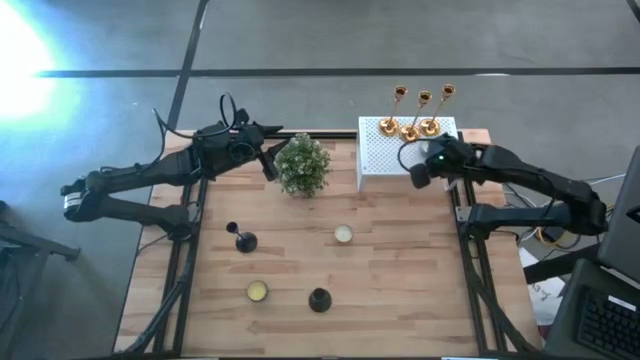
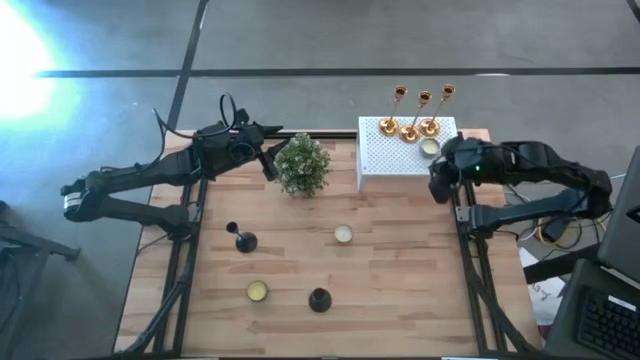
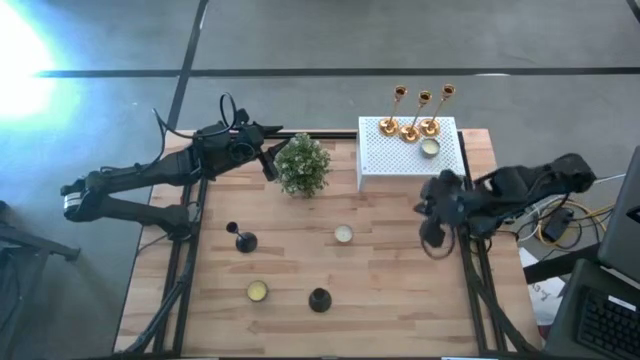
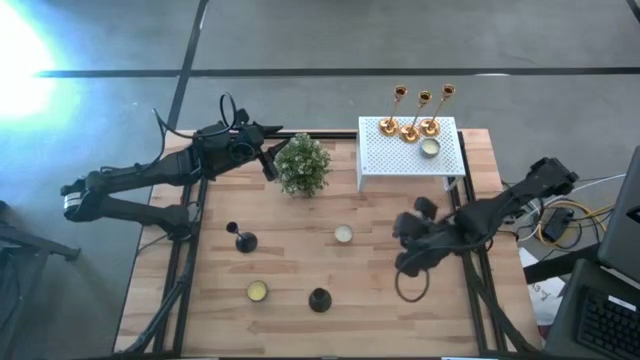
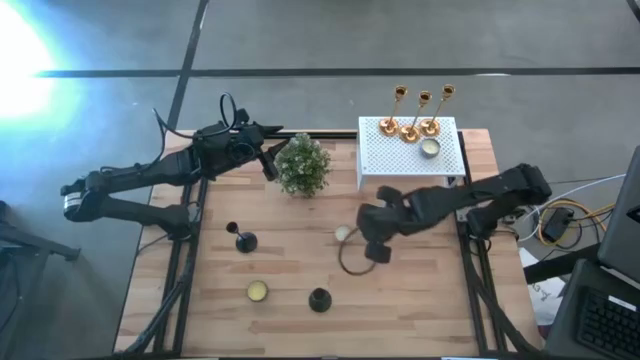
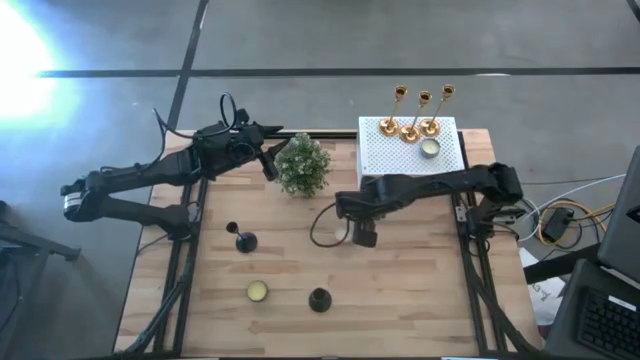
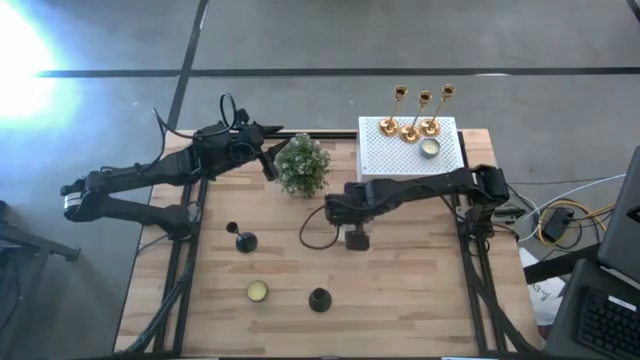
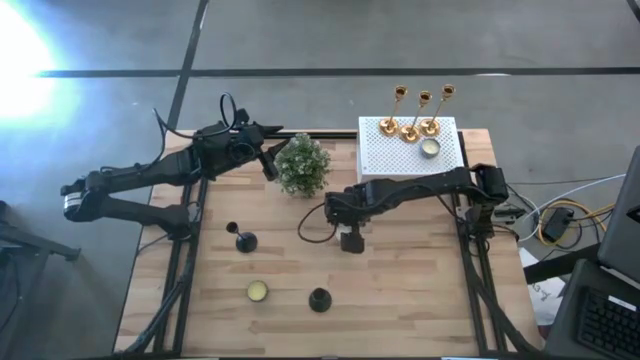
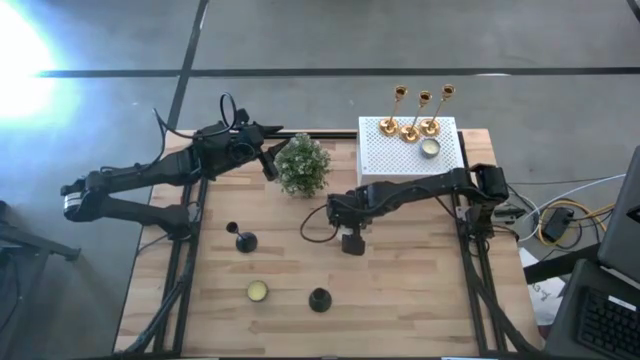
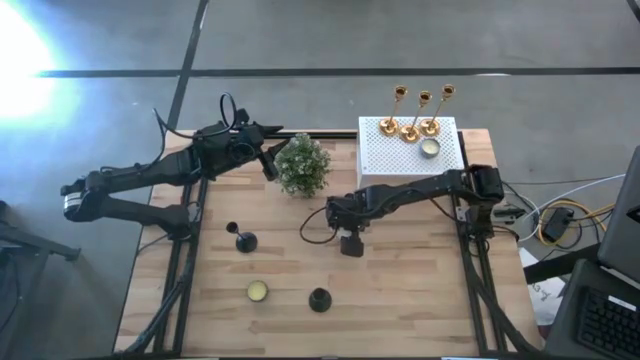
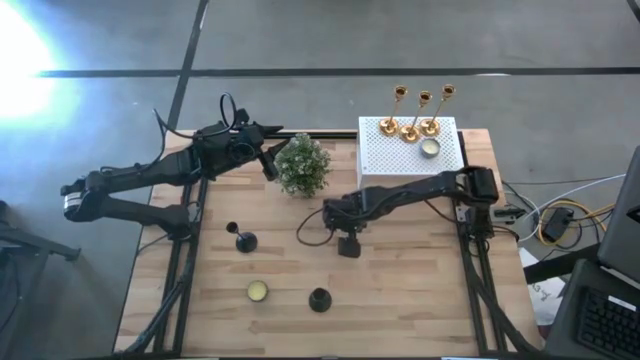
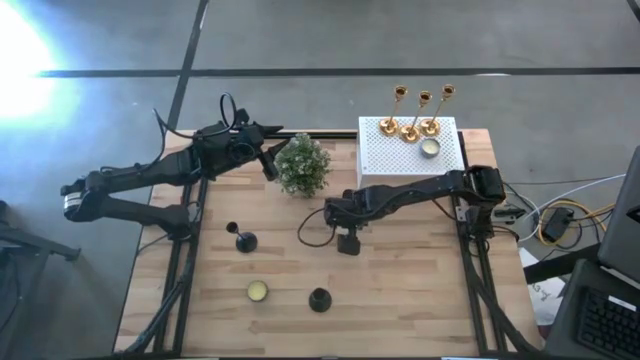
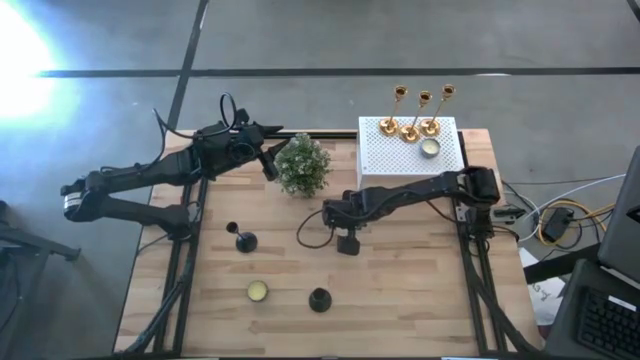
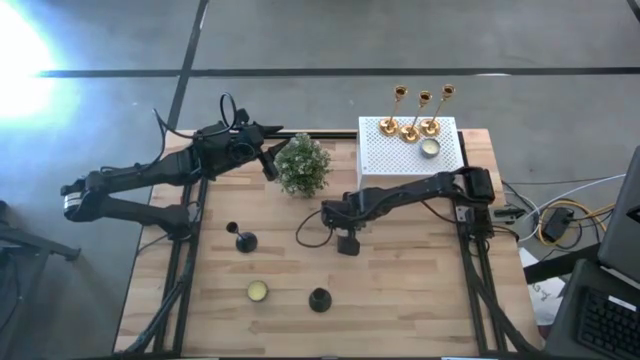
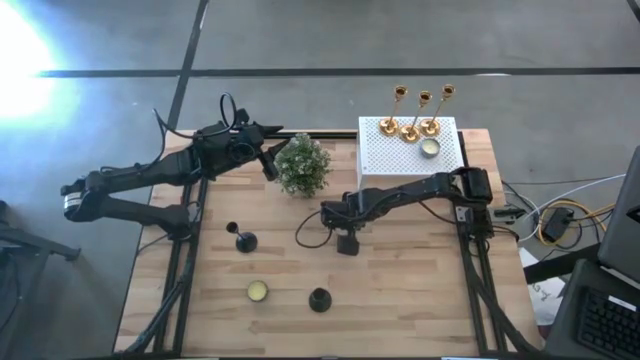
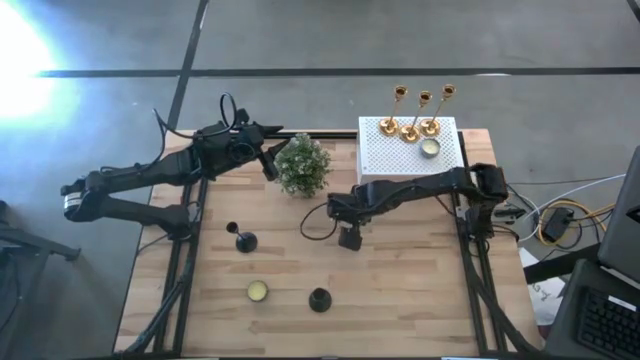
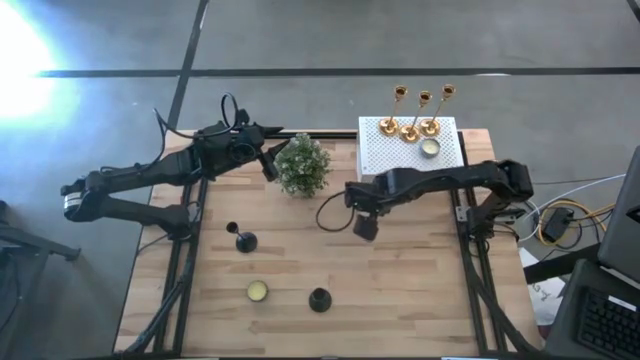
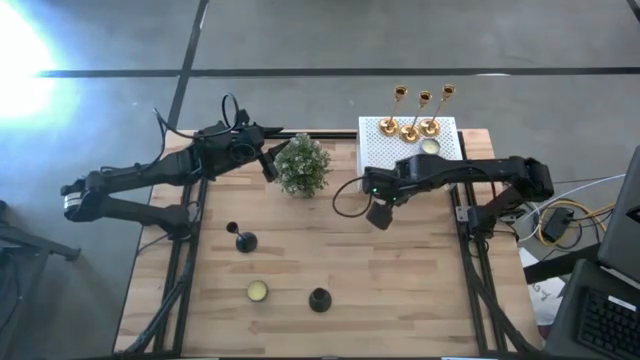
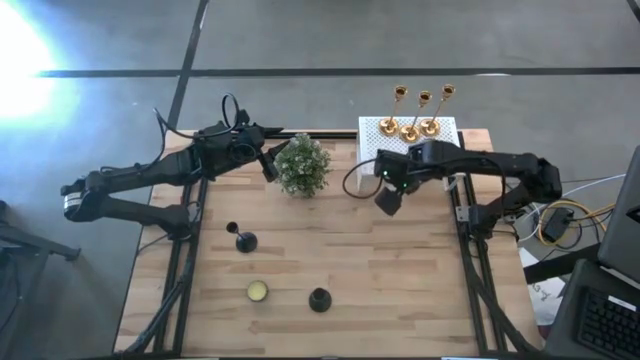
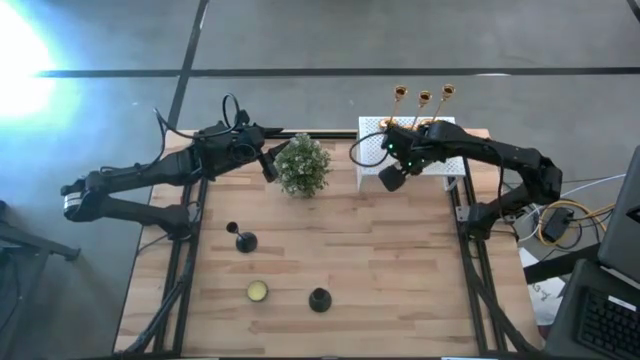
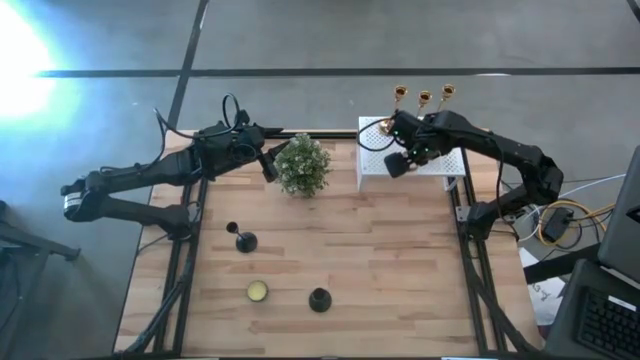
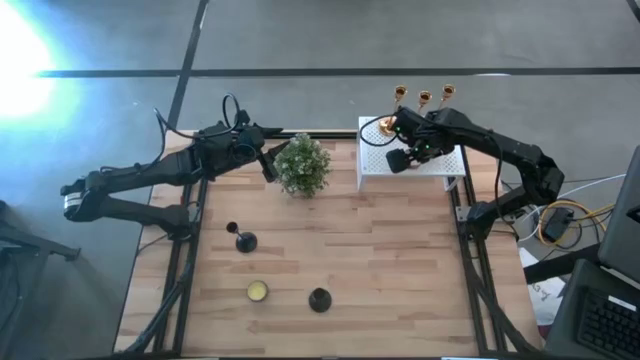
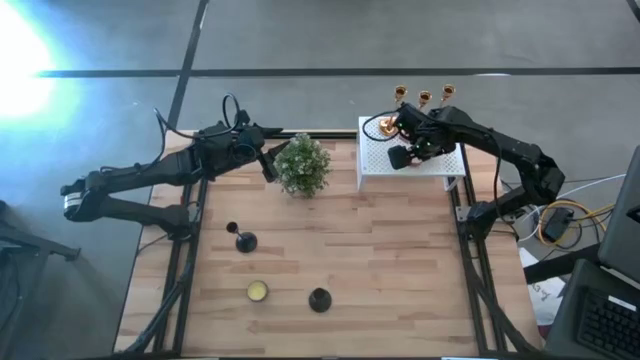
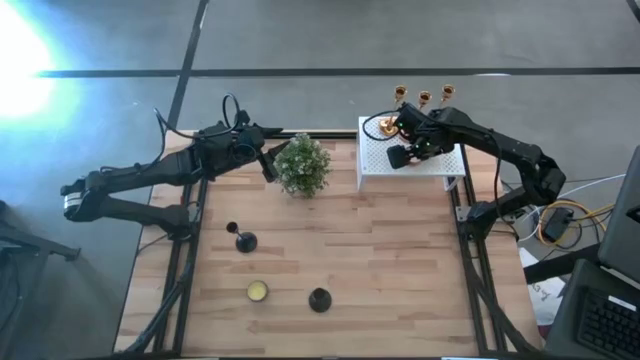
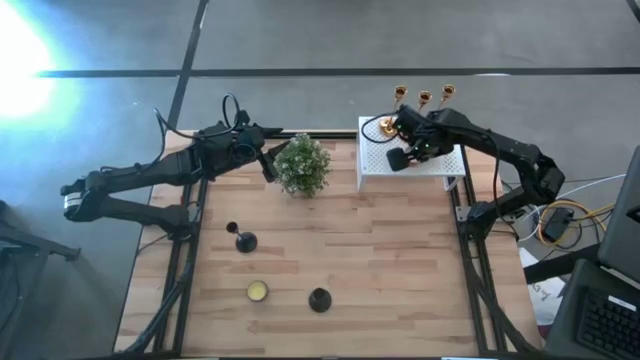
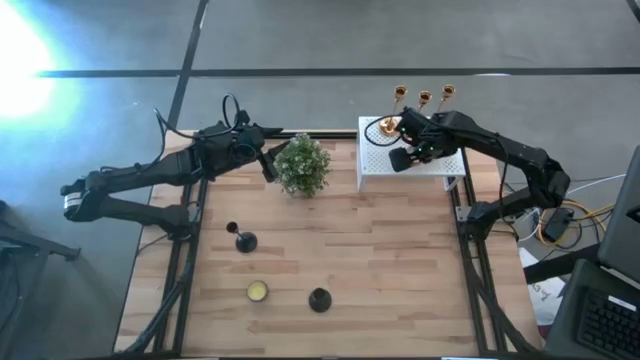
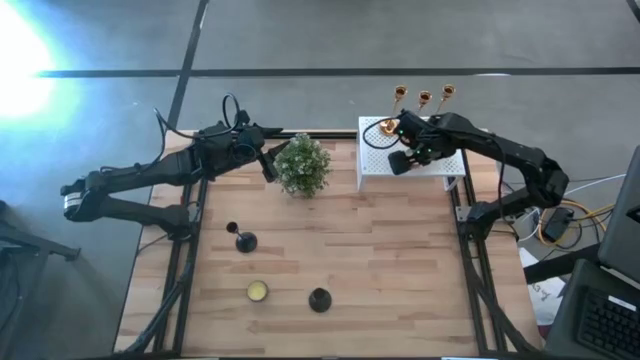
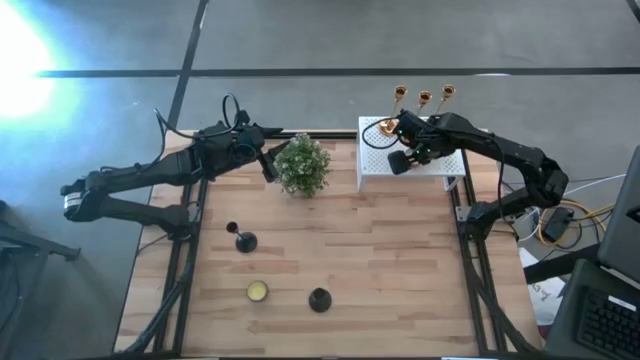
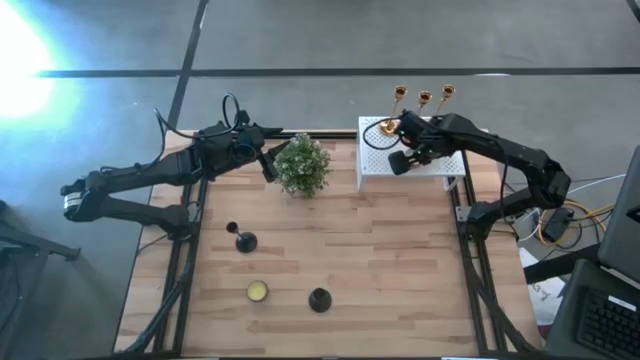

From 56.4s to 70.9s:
Task: Pick & Place candle stick holders
Put the orange scented candle on the shelf
